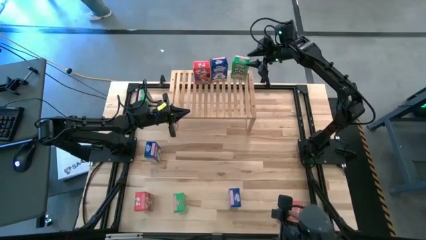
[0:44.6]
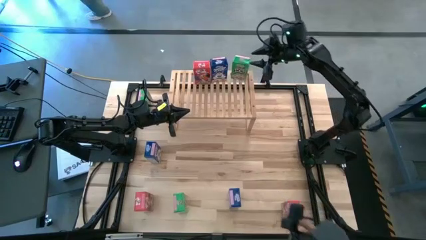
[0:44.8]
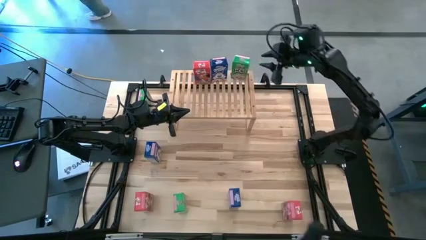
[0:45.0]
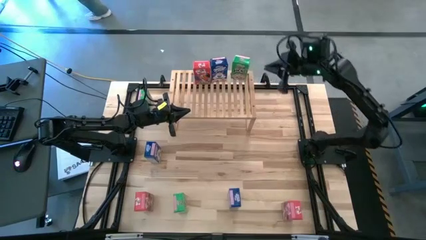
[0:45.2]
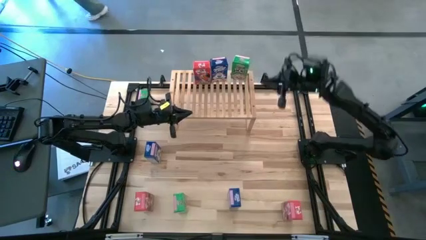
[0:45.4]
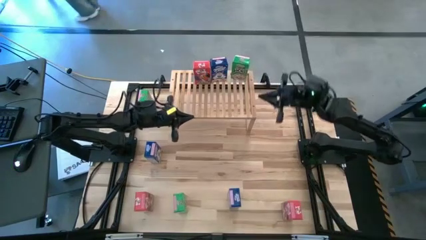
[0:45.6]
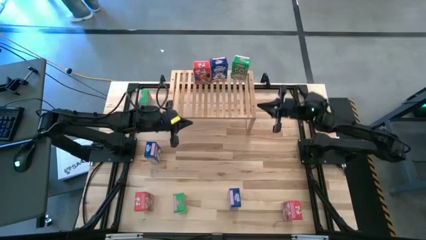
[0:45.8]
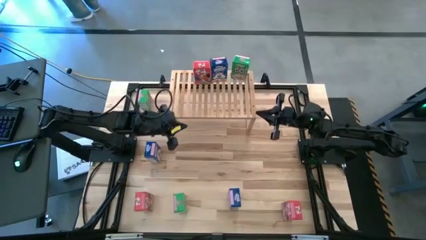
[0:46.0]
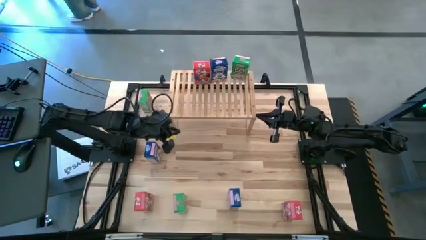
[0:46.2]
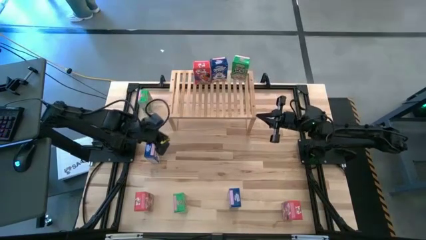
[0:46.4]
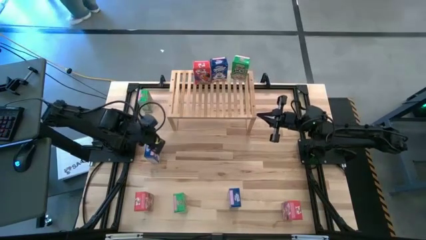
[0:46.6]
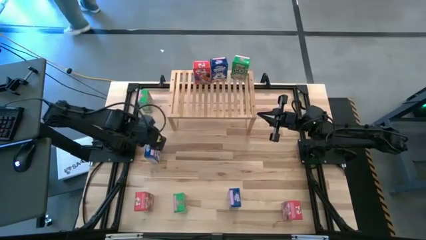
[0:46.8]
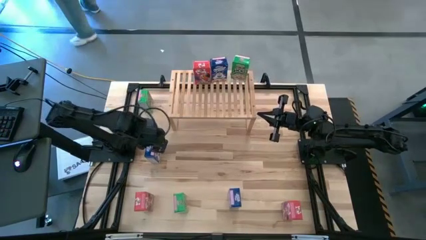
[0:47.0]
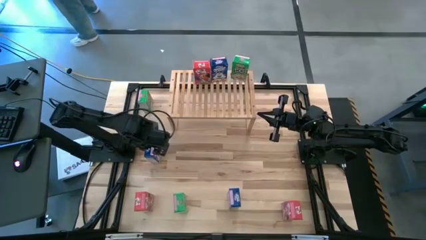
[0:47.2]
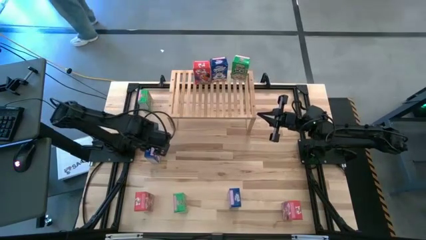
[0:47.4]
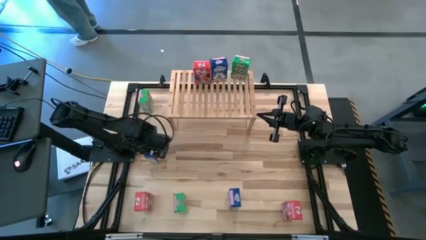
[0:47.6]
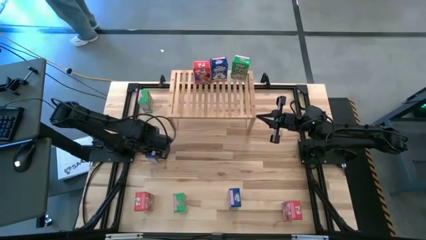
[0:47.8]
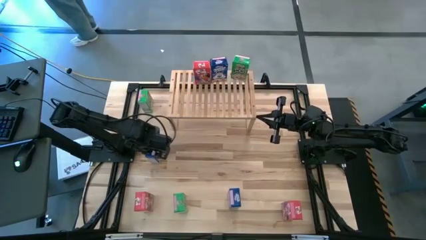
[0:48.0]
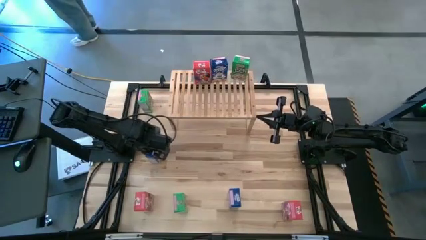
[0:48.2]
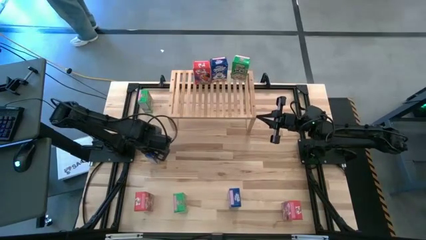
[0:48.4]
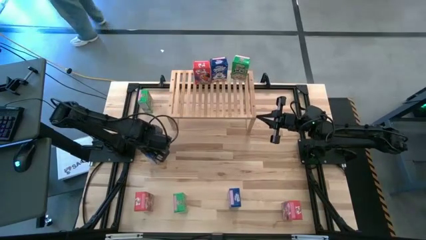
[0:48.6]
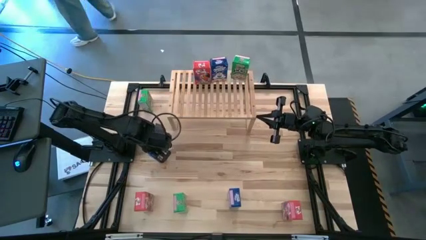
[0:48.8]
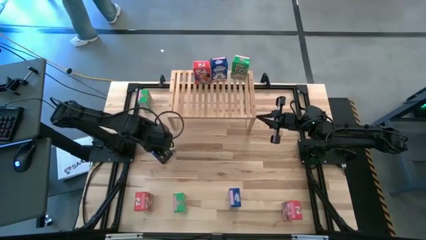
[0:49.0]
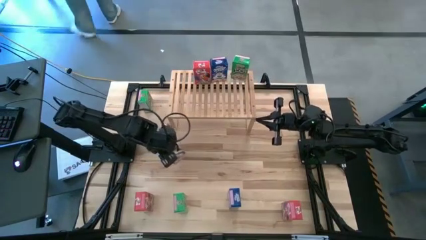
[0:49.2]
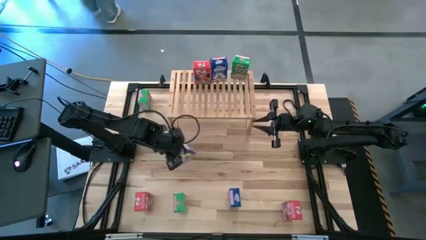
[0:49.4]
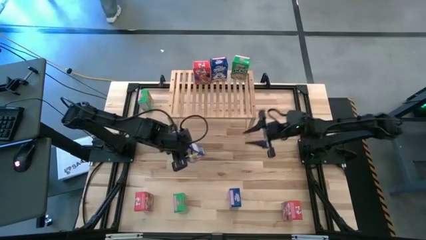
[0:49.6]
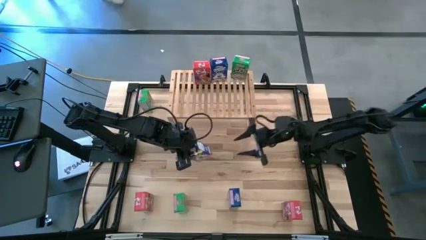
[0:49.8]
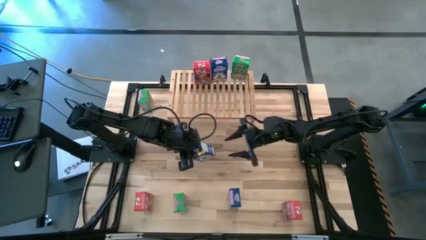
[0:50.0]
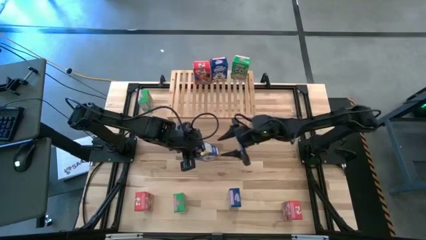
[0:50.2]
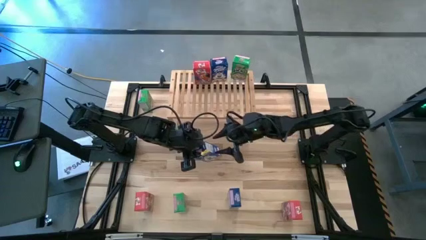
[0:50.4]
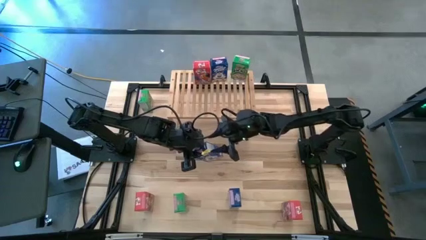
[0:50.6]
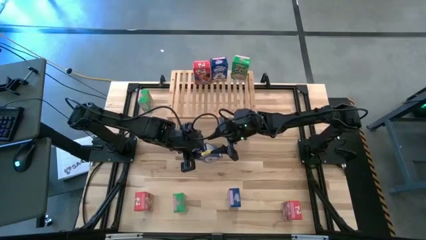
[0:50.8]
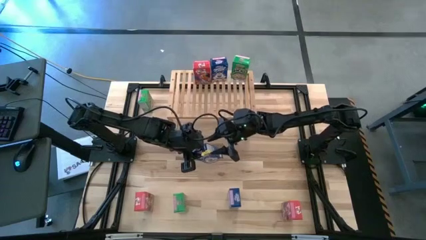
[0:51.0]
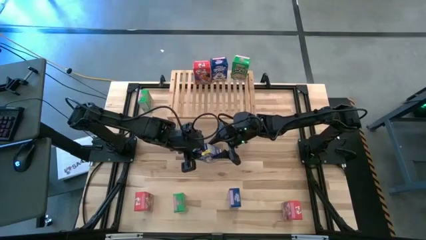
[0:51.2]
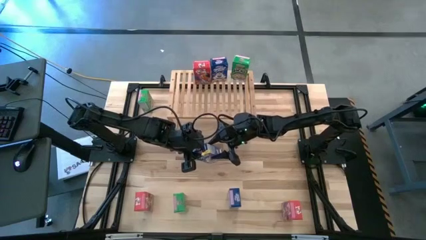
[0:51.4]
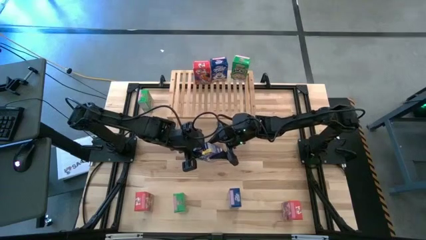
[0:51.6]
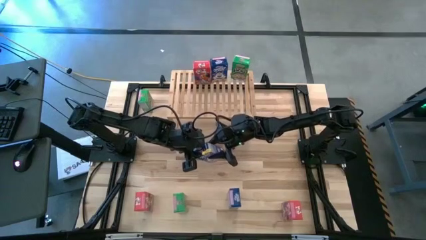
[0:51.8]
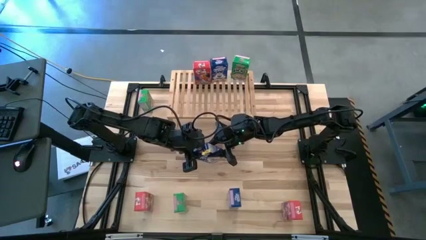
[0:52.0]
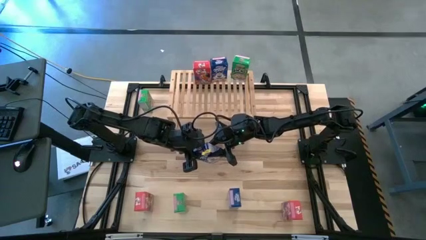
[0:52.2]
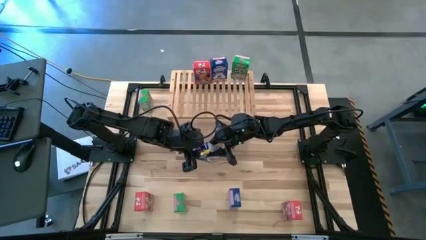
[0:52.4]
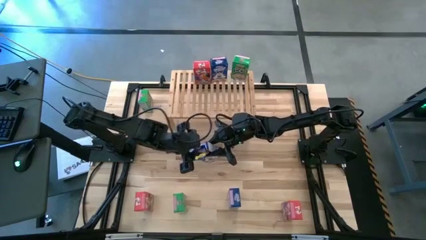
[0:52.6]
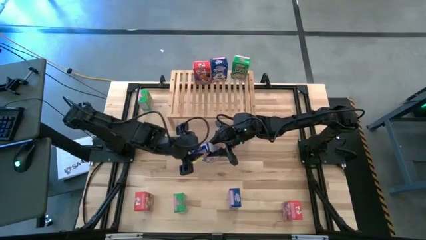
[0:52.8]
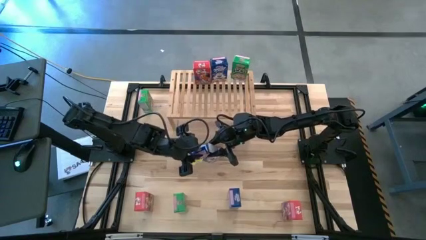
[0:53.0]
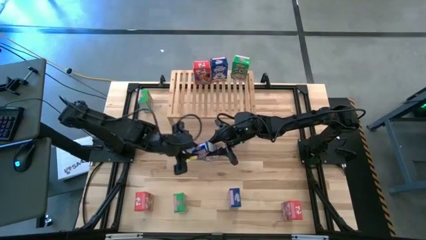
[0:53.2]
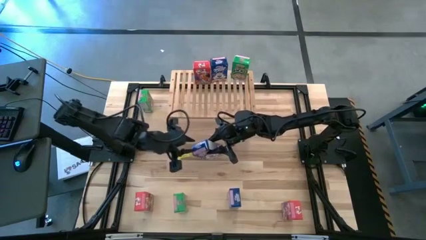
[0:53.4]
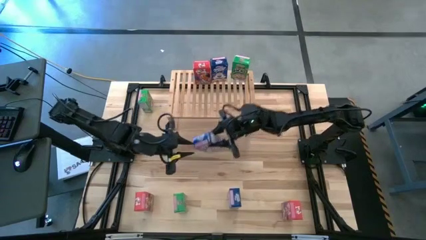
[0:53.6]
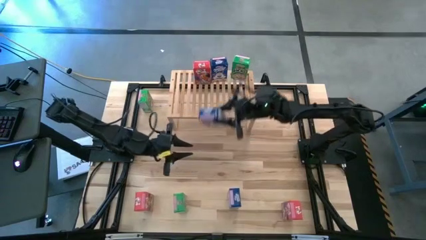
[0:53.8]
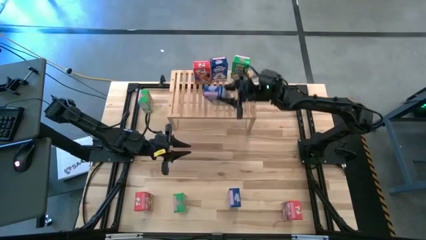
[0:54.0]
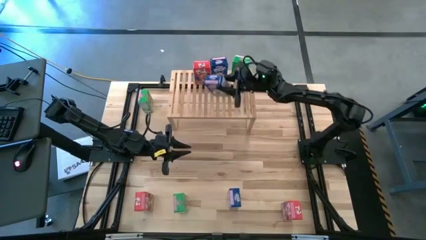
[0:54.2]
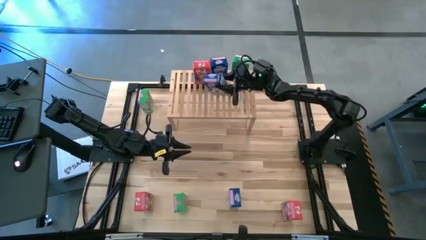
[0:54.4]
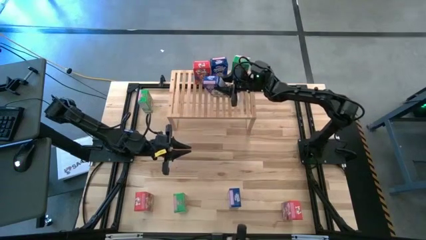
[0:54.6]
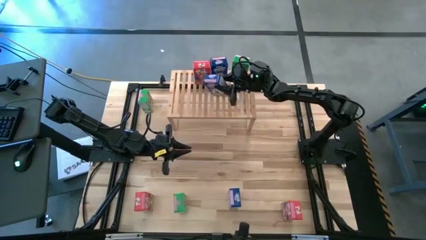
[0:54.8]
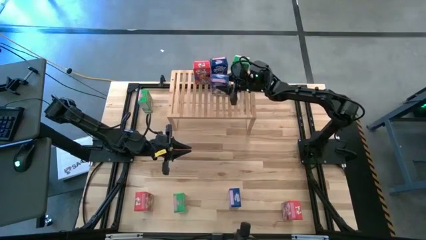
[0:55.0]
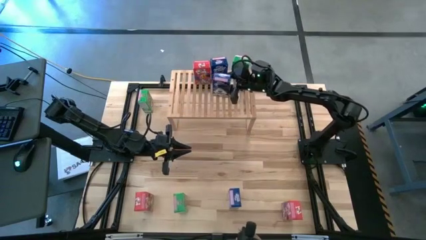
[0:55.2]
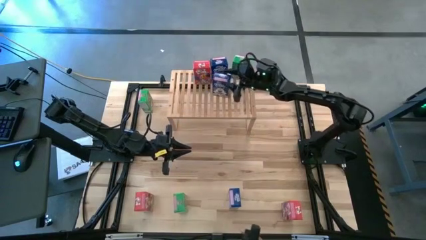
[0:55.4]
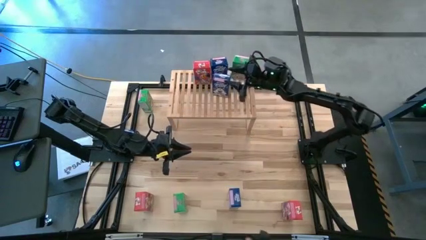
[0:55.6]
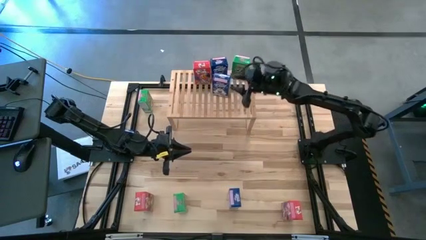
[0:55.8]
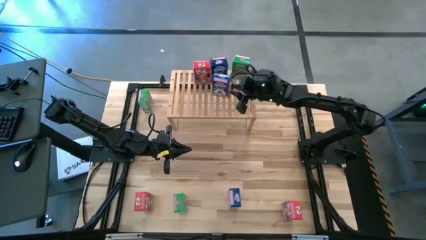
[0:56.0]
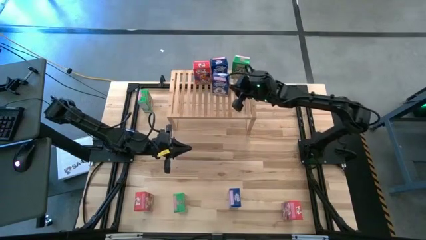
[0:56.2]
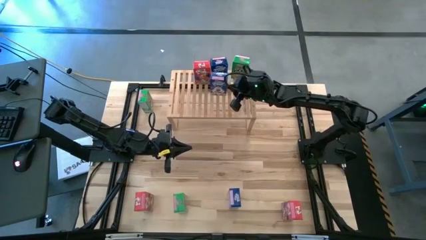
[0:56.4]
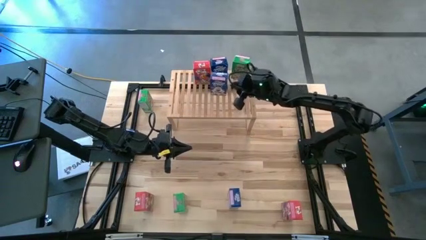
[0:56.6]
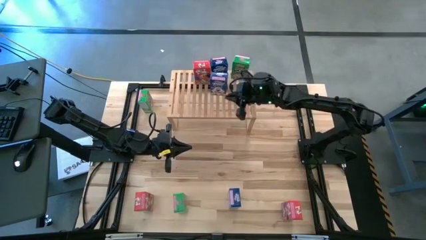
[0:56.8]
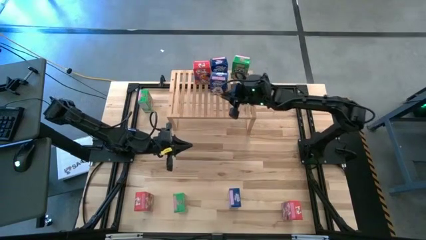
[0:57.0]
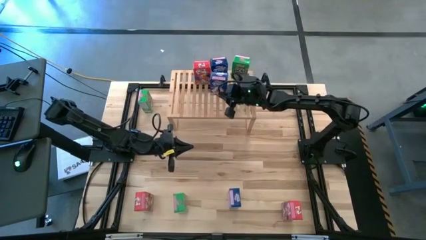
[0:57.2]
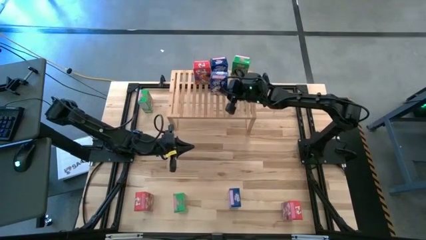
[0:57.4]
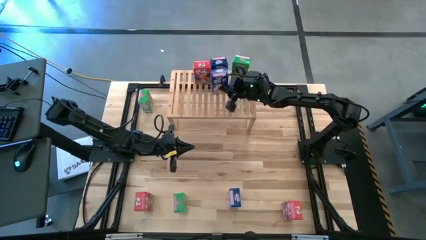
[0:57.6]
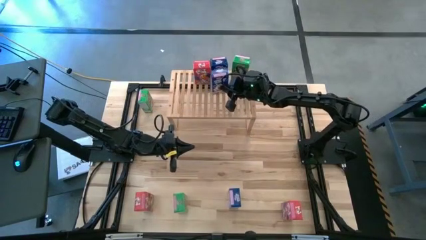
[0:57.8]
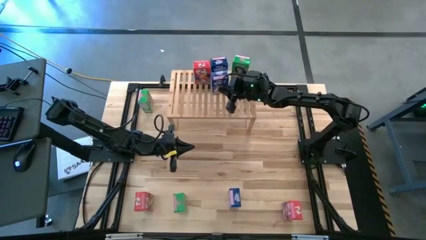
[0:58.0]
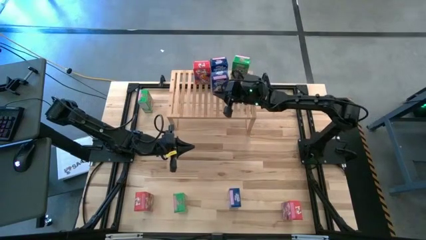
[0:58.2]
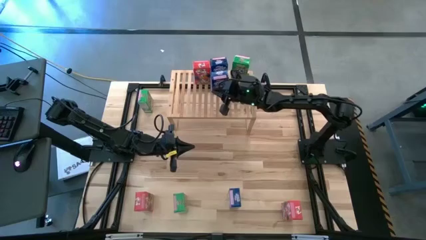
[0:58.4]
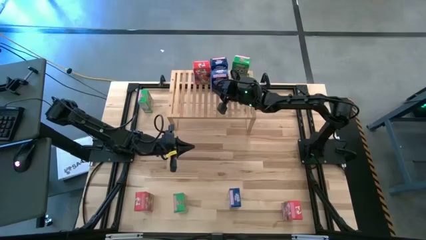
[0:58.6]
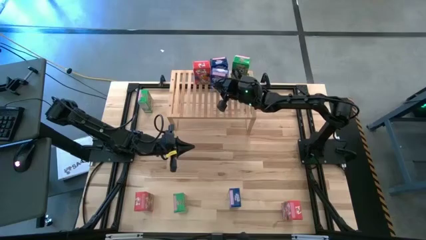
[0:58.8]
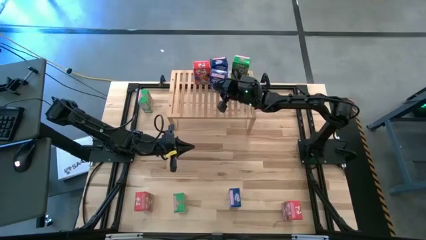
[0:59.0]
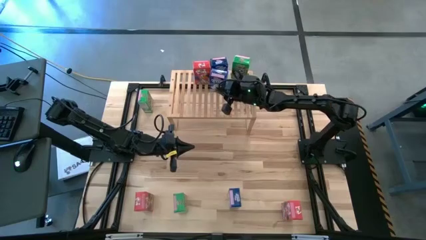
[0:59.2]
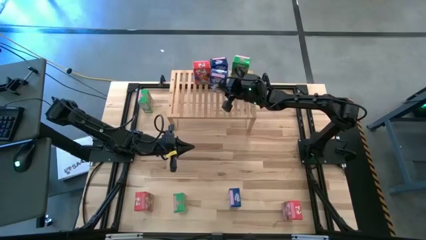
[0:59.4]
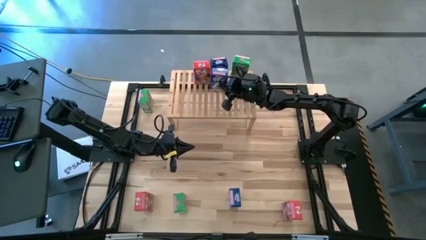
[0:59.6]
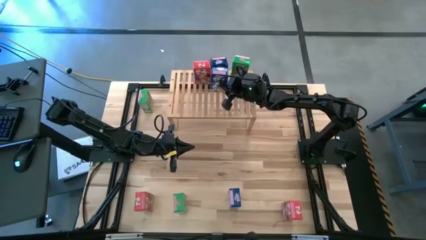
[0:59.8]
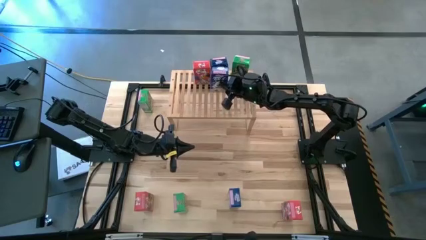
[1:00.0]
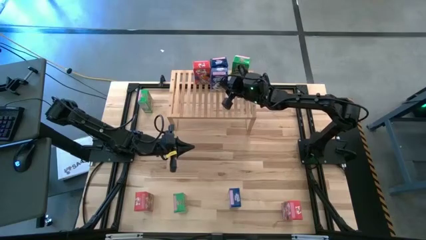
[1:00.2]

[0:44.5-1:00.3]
Task: Stack cereal on shelf
Put the top blue cereal box aligned with the other blue cereal box on the shelf
